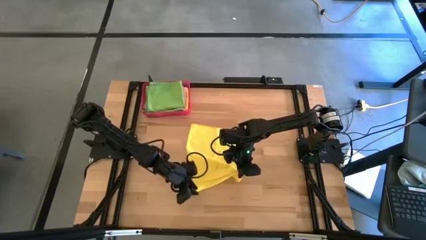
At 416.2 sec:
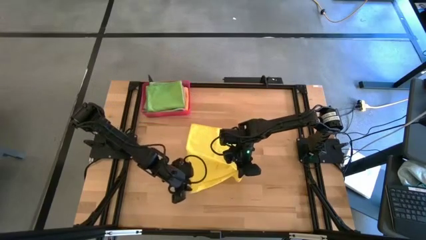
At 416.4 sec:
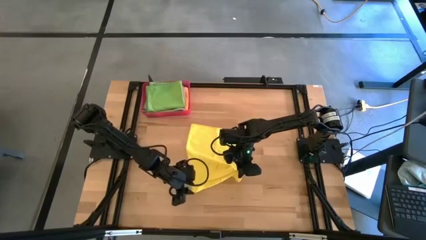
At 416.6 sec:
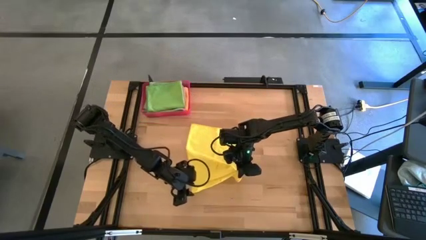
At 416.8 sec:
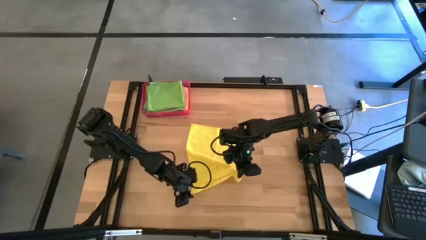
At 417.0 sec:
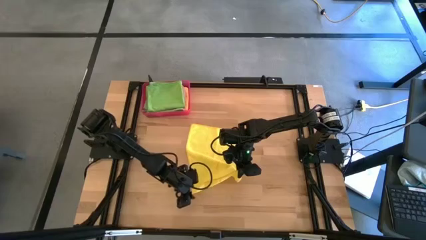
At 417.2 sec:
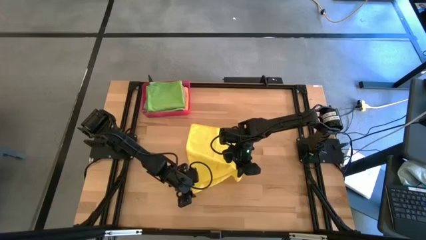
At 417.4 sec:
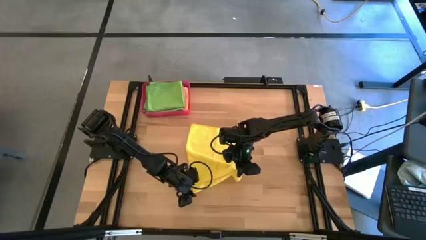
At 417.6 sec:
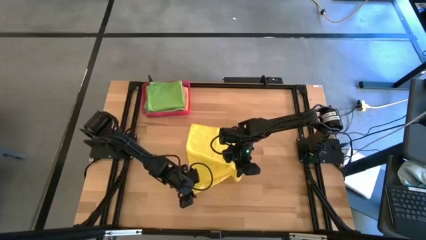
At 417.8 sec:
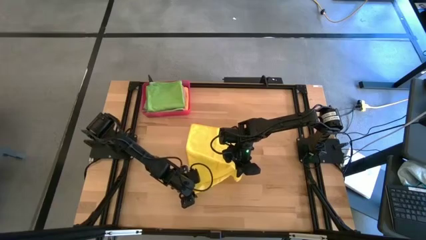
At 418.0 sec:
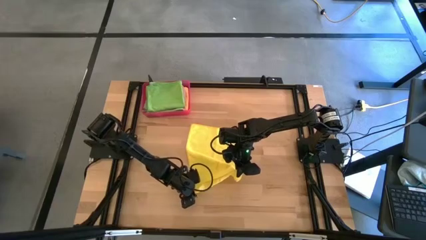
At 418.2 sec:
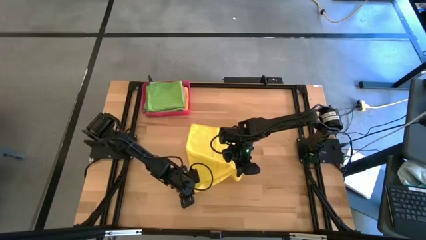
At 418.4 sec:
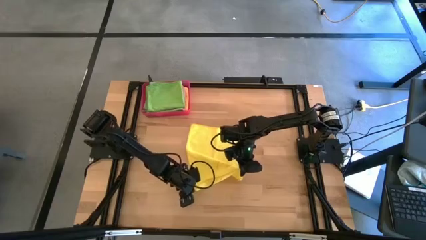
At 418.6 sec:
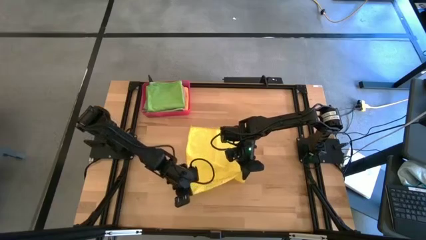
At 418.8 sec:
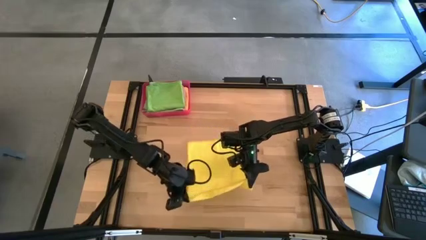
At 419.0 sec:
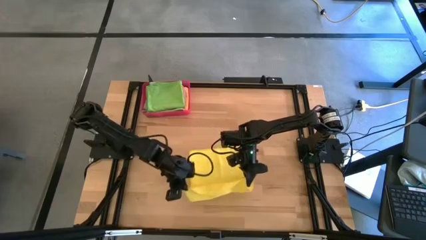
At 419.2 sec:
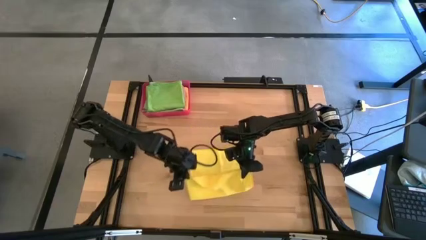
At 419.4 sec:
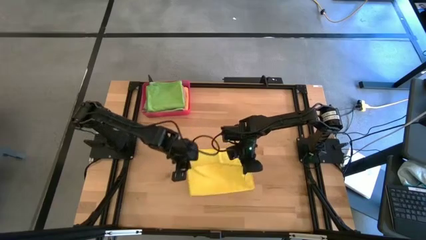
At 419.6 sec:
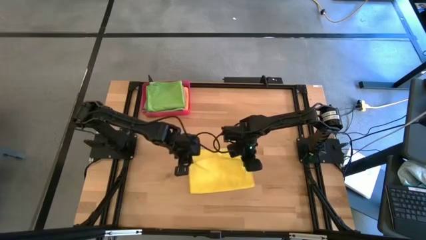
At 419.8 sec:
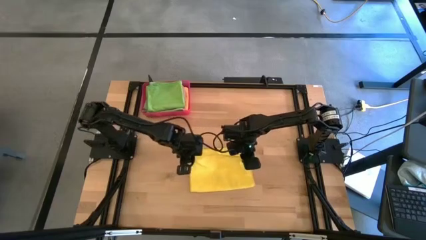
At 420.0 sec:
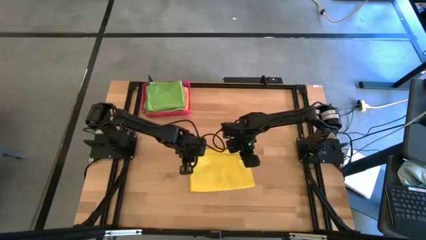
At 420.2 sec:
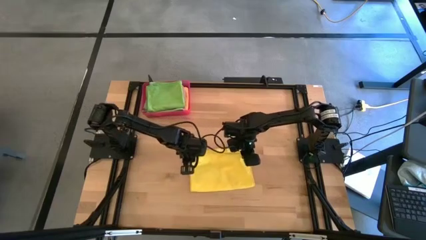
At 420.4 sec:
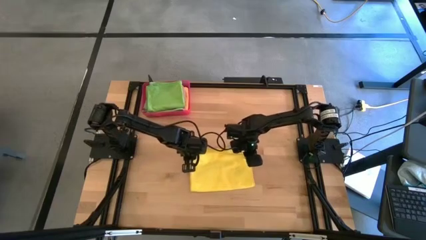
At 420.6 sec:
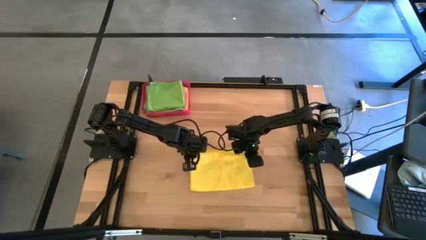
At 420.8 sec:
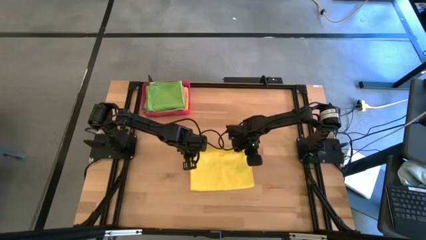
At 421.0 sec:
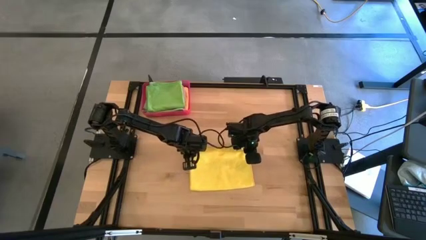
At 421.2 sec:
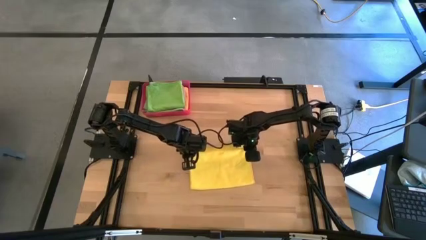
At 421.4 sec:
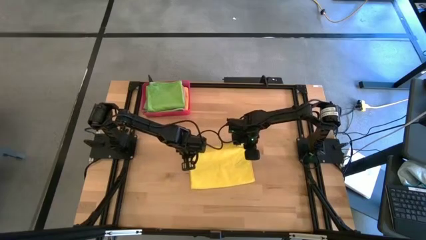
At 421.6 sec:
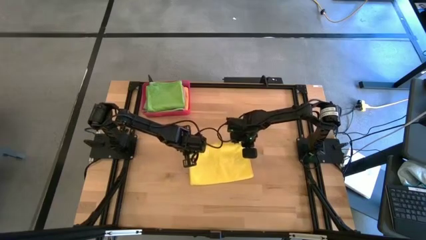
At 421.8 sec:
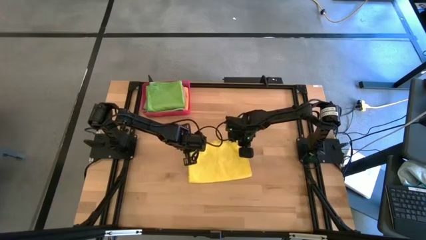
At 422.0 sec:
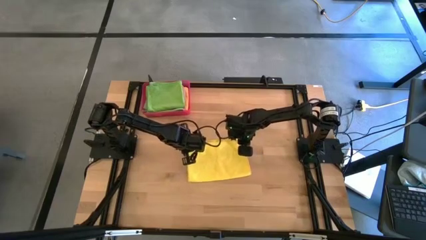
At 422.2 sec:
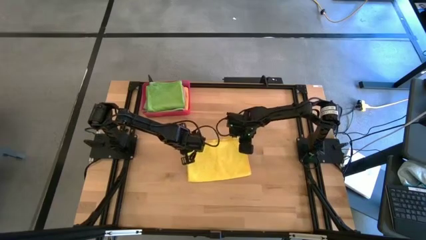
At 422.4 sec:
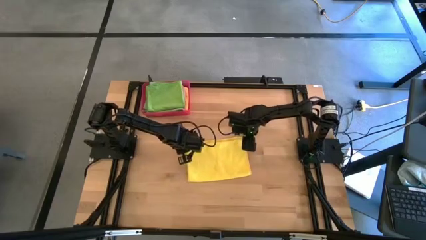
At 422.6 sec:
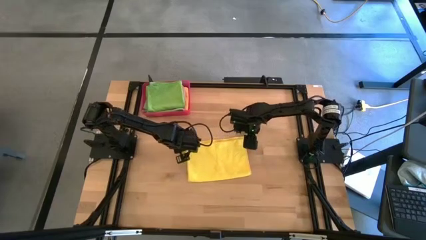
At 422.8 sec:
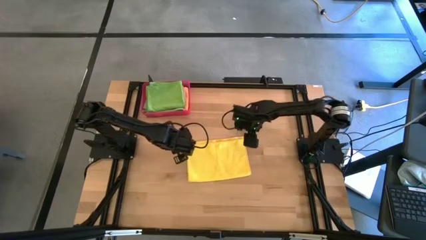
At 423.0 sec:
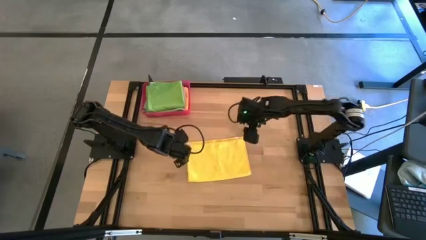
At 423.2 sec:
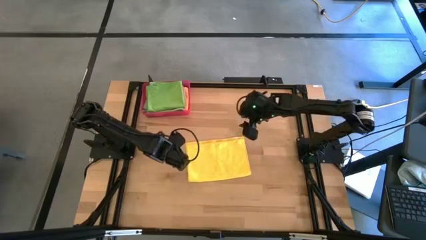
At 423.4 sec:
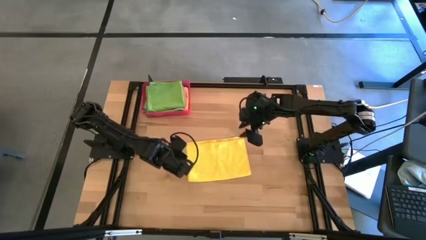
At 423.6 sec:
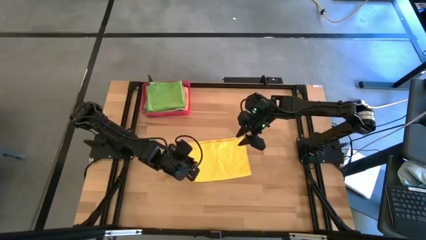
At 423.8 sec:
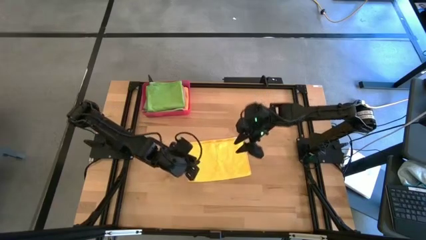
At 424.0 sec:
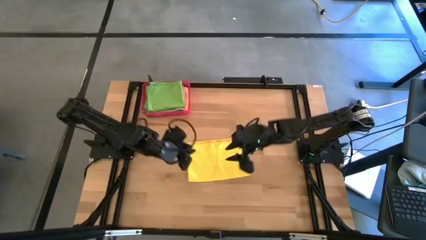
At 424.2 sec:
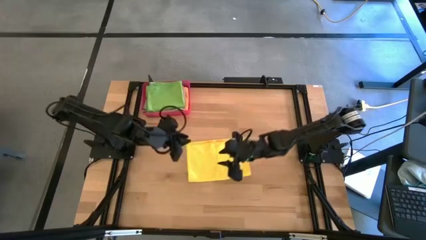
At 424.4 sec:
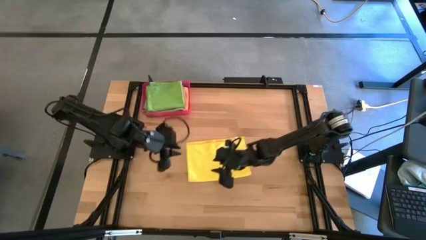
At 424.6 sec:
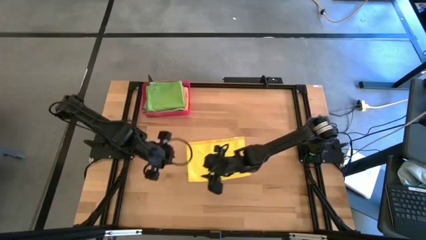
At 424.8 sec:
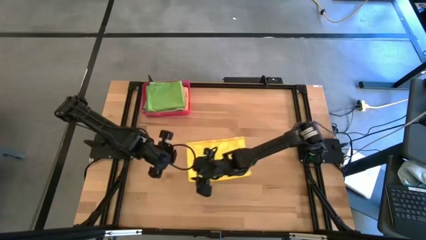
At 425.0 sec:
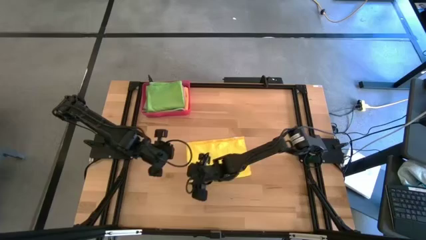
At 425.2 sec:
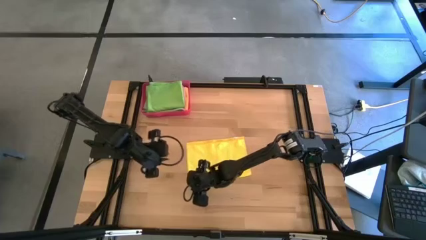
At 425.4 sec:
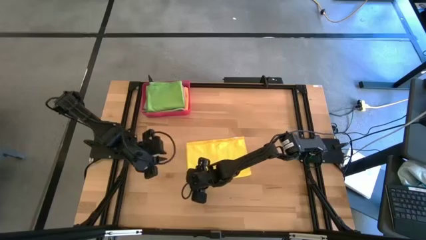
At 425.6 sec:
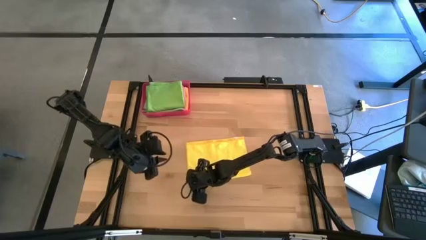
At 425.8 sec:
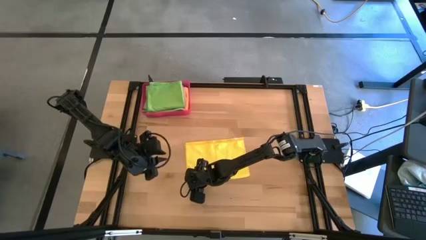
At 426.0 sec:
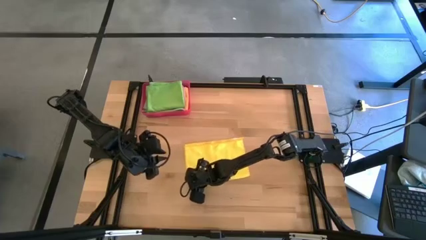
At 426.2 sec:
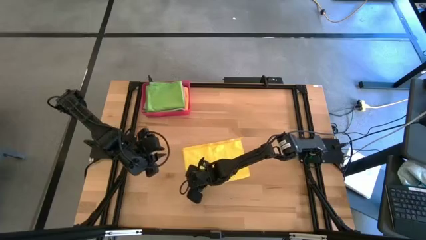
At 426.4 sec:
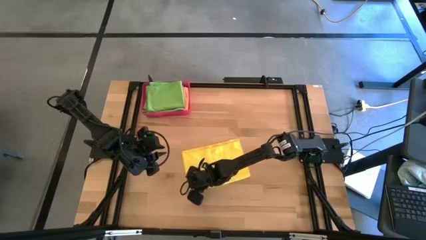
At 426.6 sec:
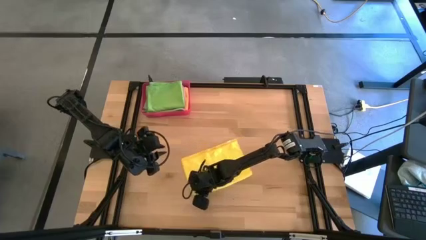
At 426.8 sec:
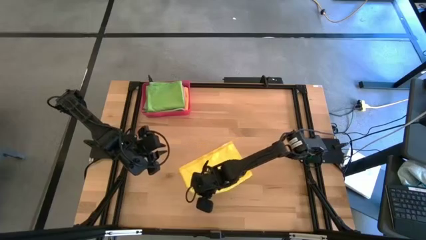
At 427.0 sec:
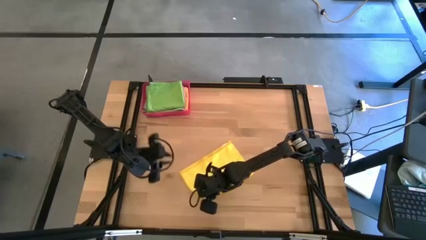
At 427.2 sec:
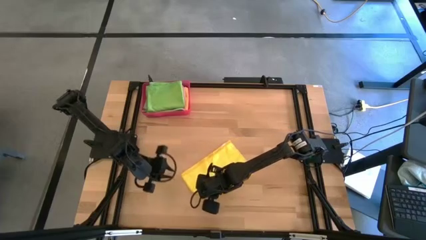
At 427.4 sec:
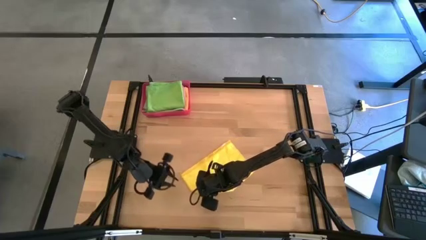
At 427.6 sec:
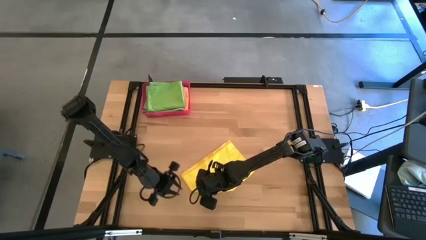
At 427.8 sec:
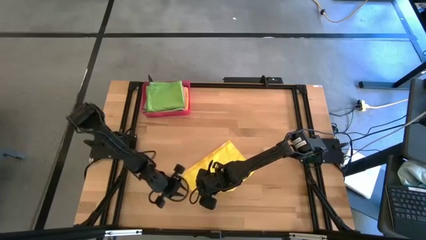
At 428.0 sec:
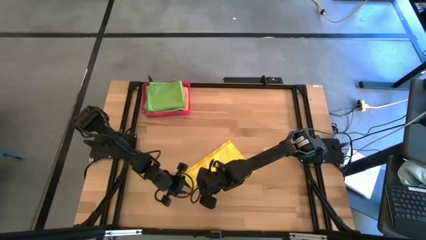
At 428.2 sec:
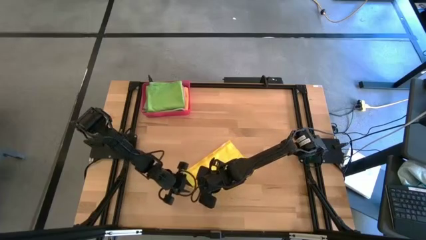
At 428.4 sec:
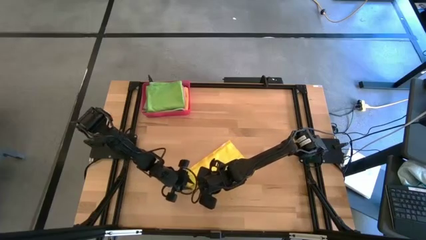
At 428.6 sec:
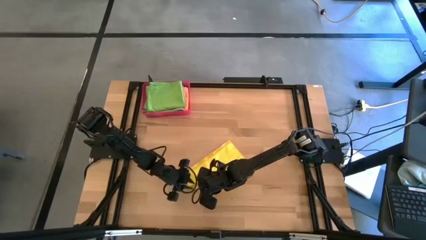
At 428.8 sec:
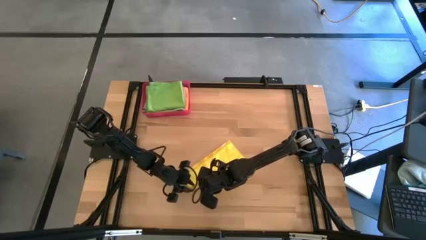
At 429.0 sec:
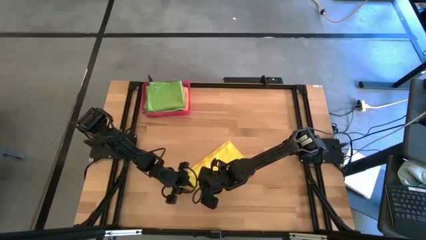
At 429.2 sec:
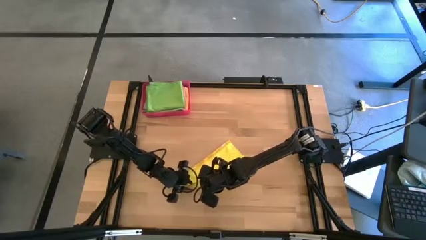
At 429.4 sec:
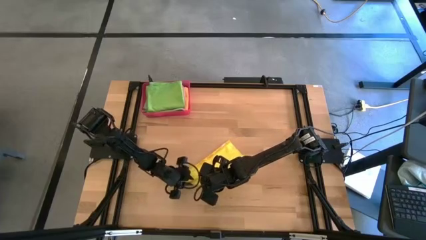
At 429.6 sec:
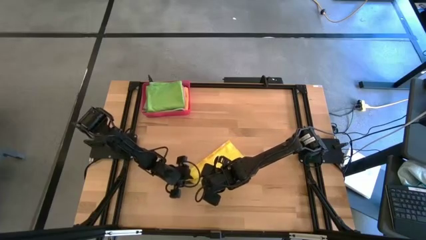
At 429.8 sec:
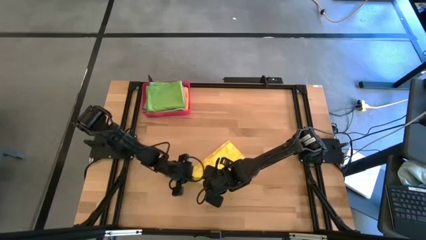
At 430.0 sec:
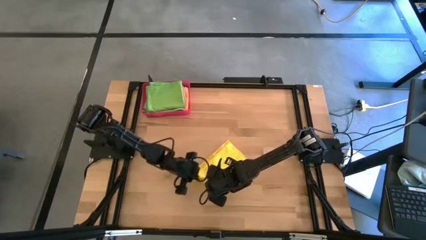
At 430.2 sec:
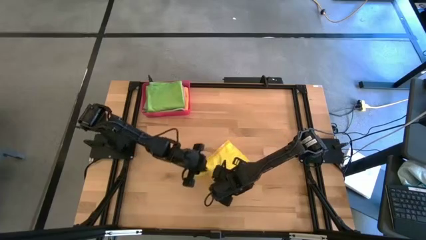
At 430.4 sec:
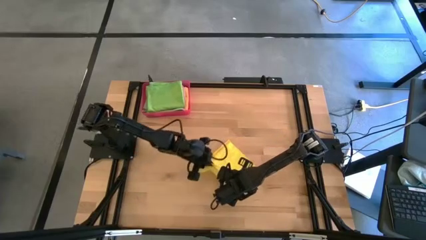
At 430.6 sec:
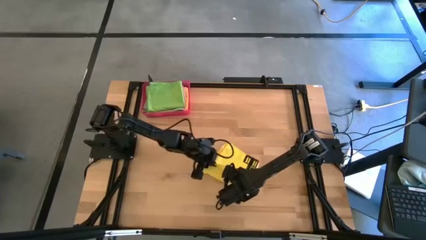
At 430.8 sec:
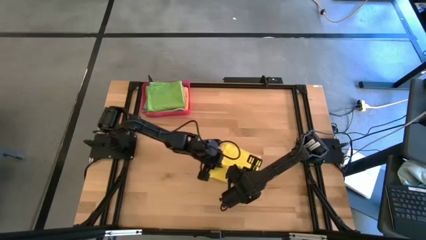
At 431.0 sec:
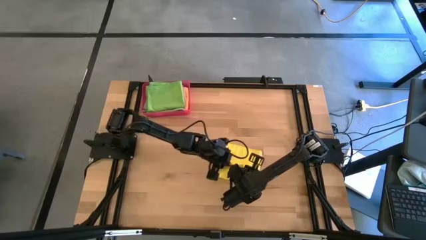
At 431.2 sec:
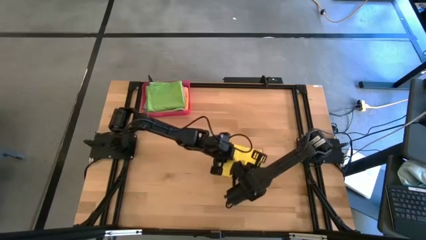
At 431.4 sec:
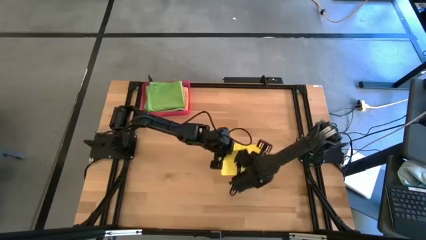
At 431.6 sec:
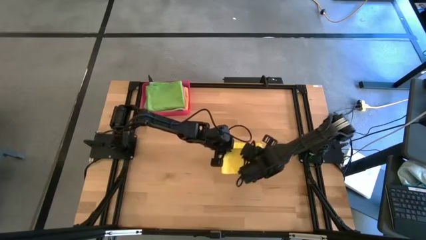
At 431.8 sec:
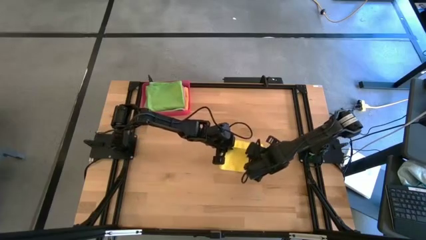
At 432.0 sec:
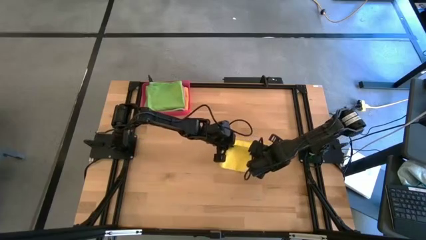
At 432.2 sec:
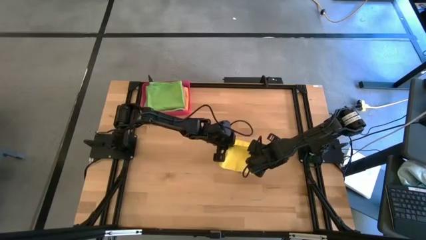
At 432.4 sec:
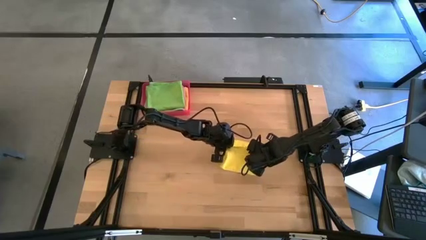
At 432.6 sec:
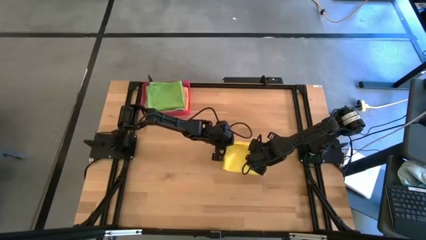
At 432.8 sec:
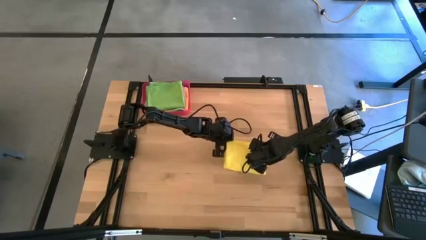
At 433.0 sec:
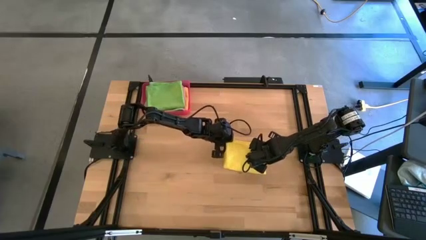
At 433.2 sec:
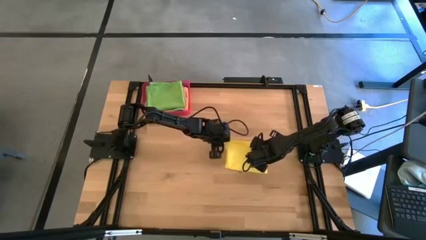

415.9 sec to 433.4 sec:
Task: Fold microfiber towels
Fold the yellow microfiber towel
